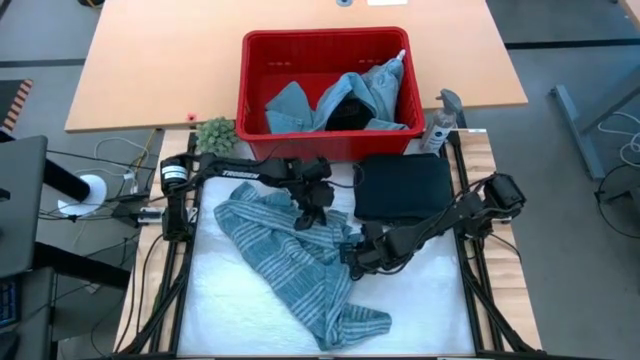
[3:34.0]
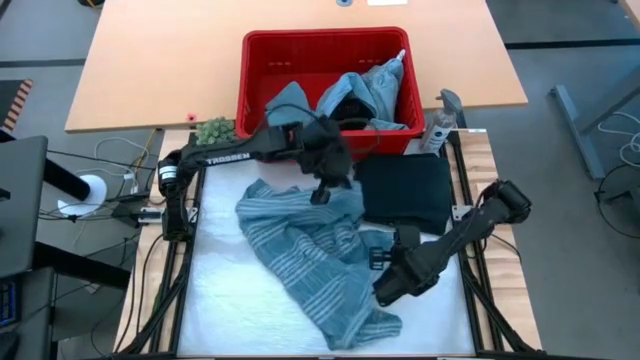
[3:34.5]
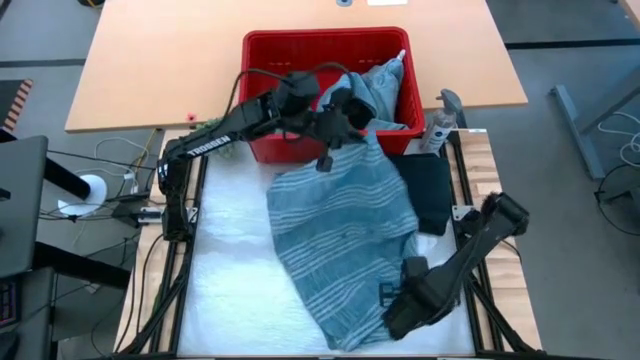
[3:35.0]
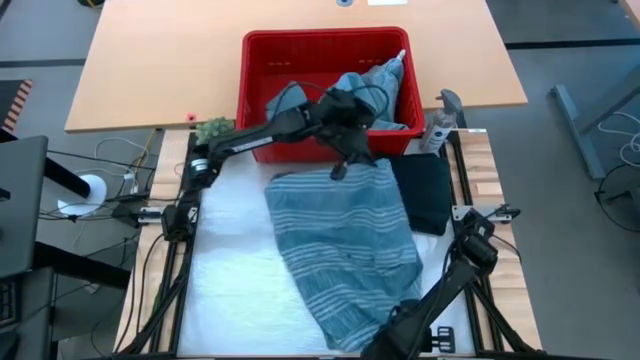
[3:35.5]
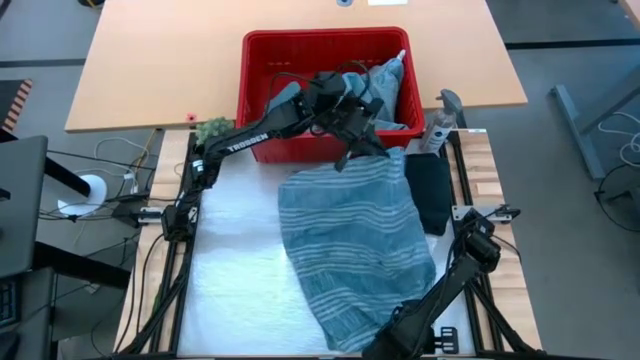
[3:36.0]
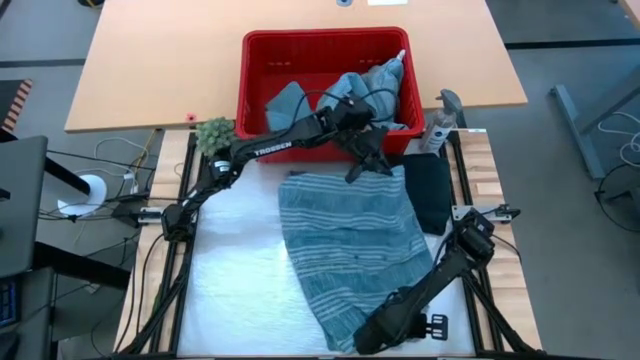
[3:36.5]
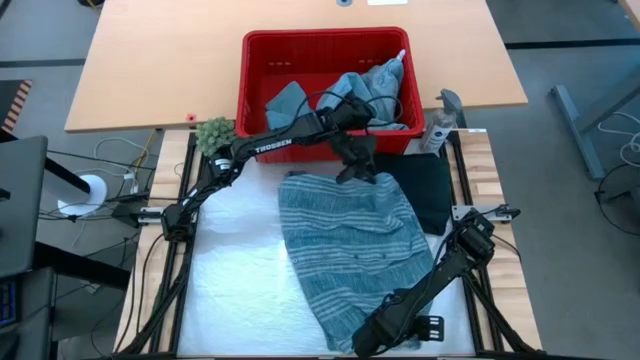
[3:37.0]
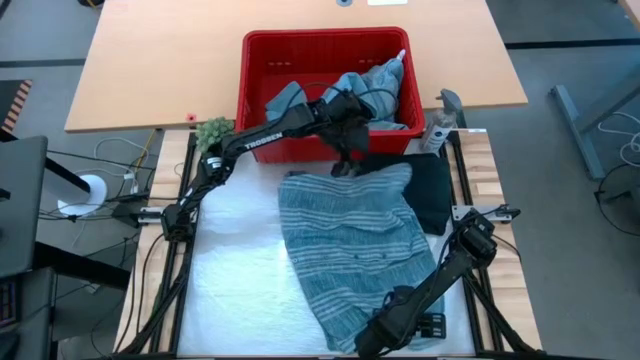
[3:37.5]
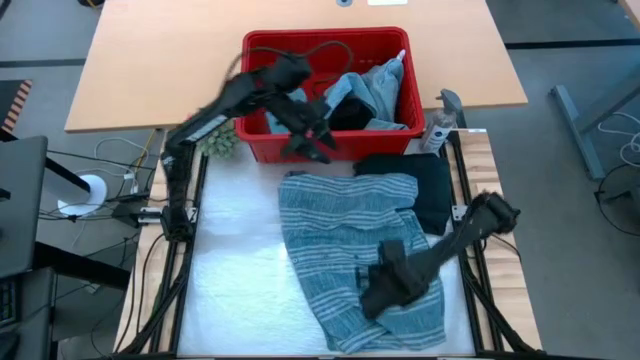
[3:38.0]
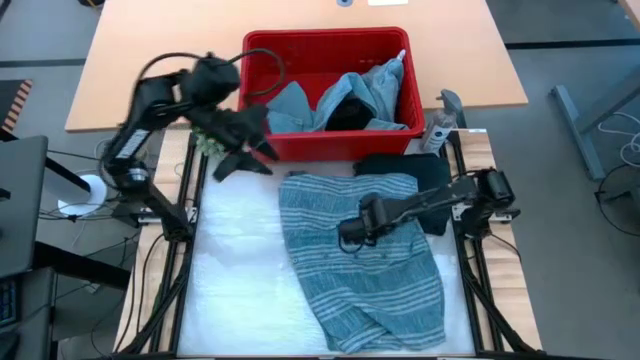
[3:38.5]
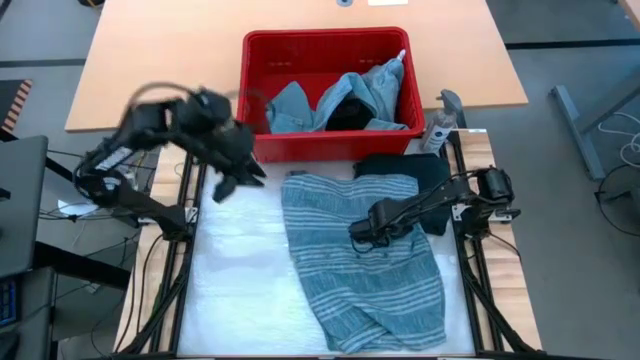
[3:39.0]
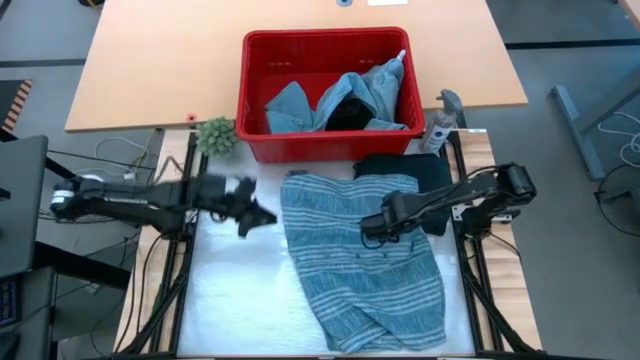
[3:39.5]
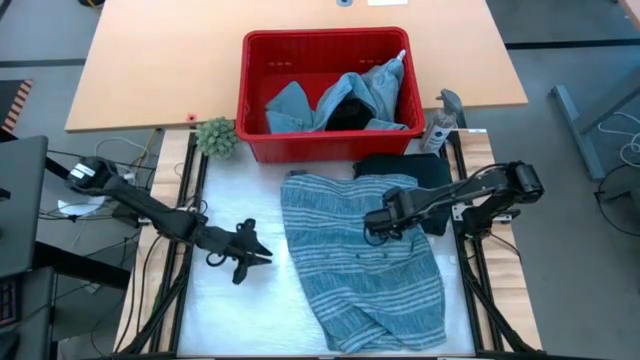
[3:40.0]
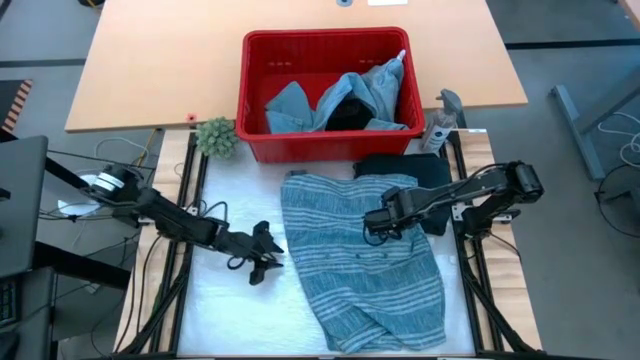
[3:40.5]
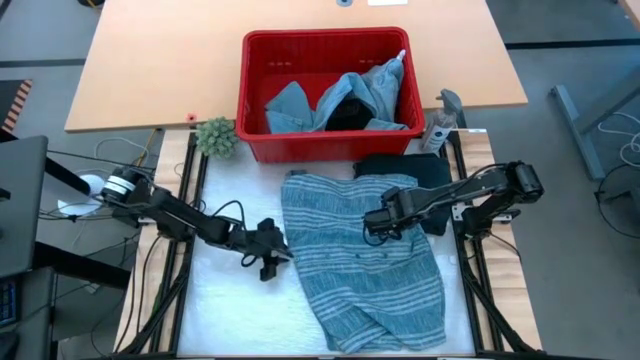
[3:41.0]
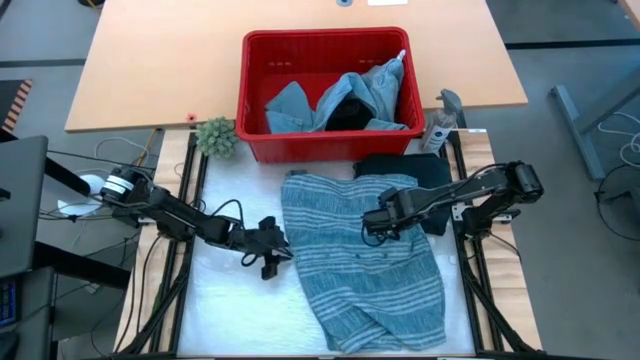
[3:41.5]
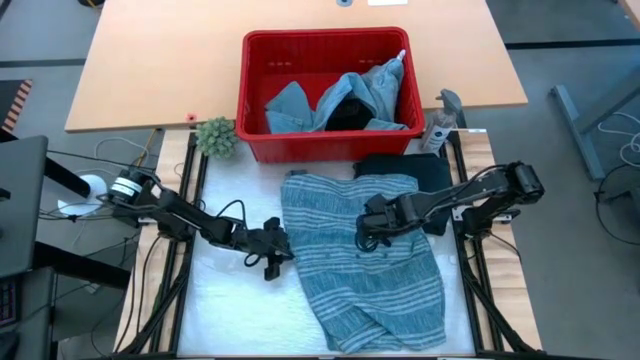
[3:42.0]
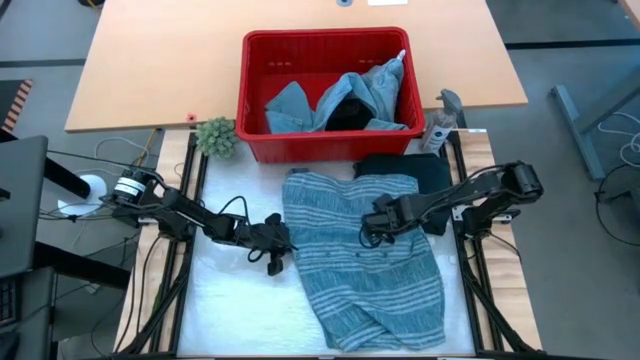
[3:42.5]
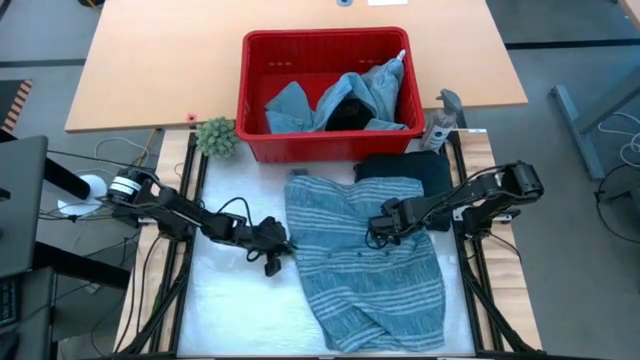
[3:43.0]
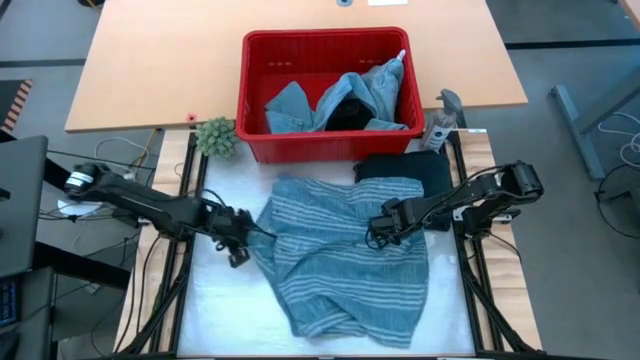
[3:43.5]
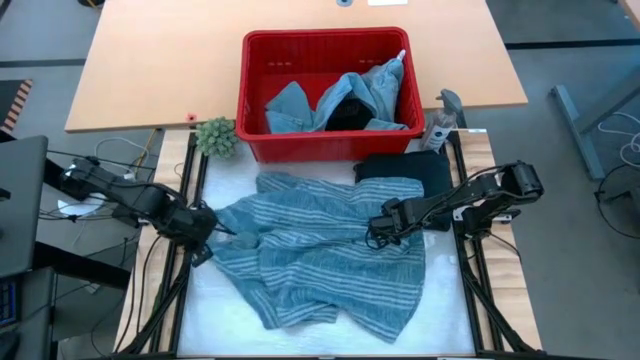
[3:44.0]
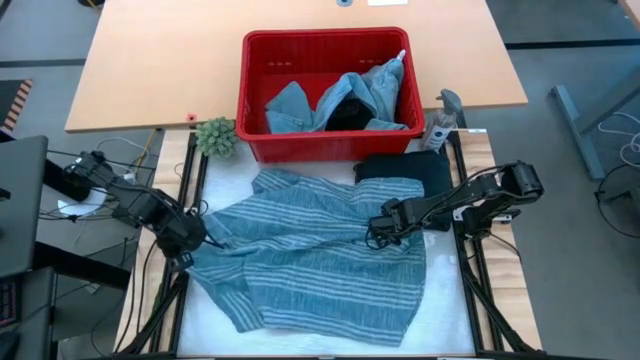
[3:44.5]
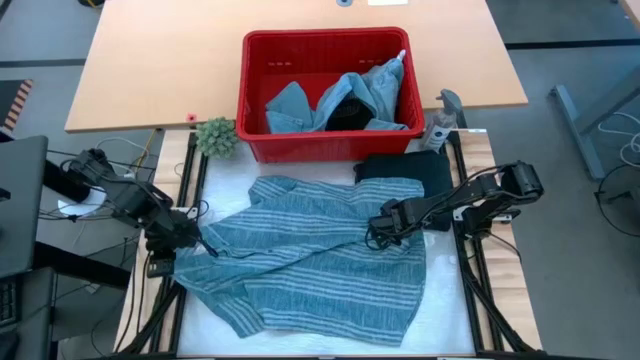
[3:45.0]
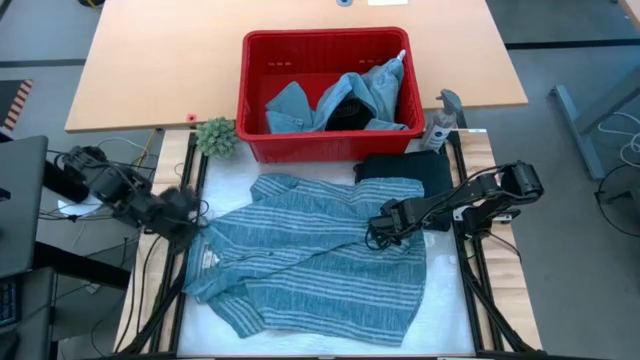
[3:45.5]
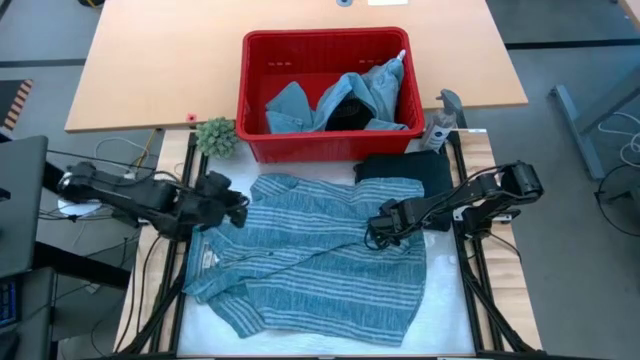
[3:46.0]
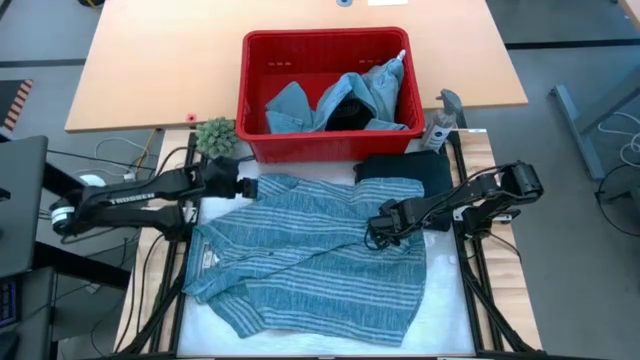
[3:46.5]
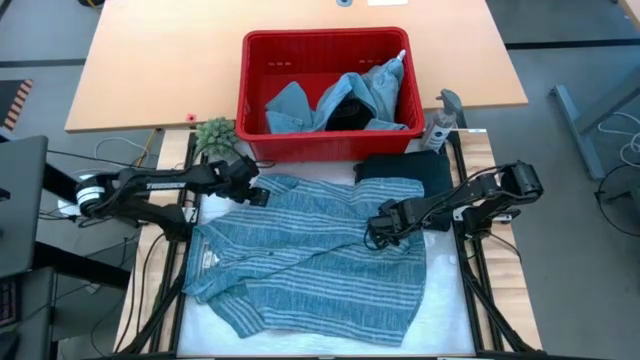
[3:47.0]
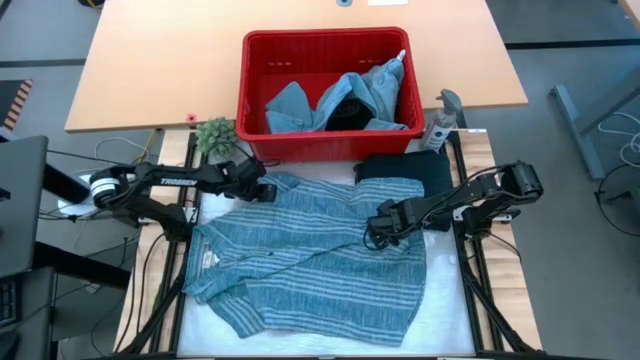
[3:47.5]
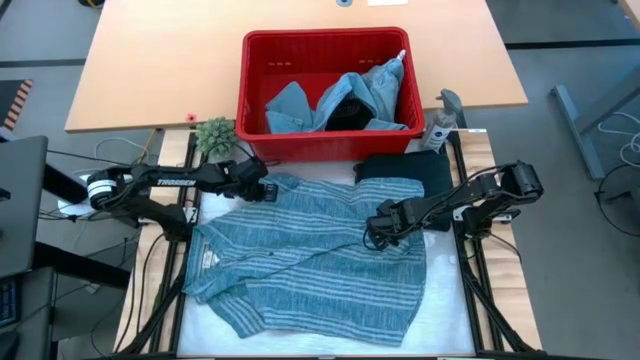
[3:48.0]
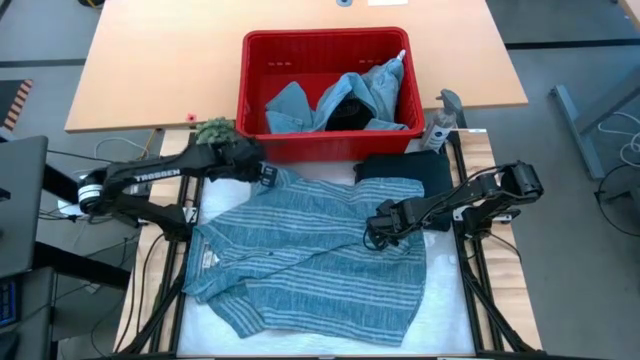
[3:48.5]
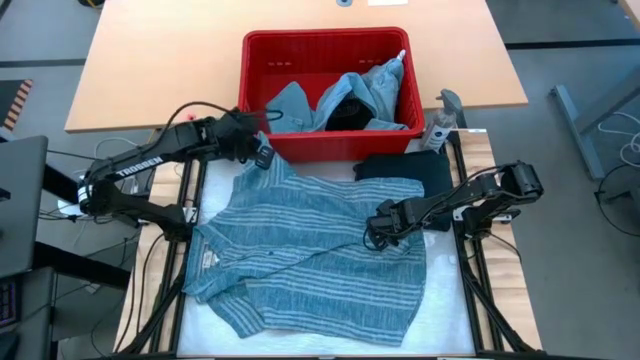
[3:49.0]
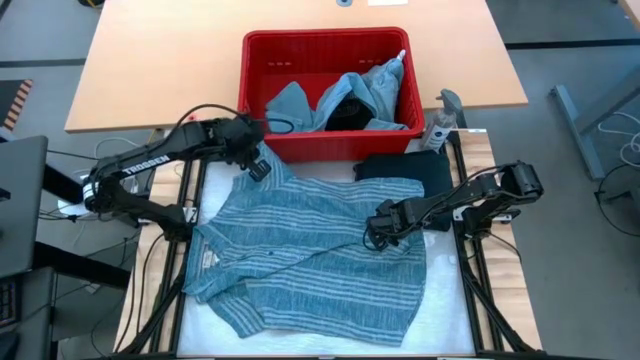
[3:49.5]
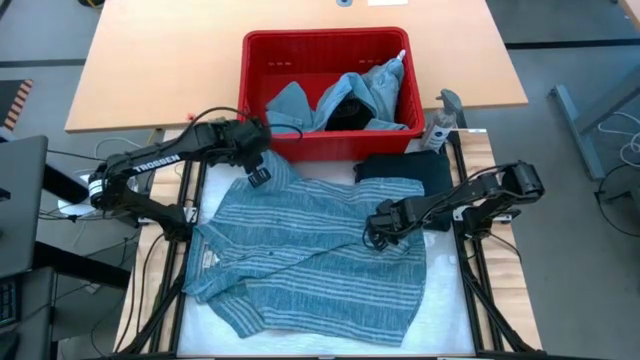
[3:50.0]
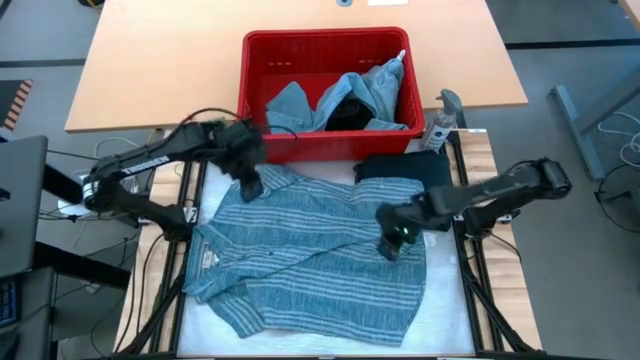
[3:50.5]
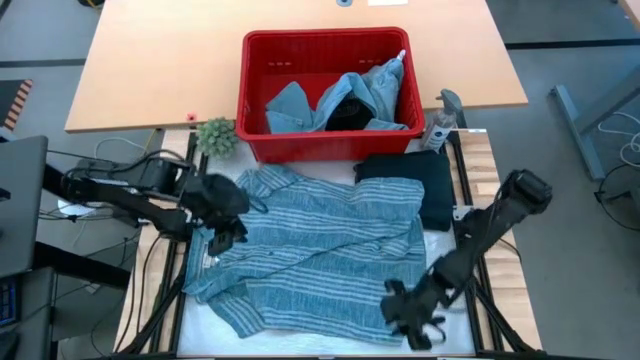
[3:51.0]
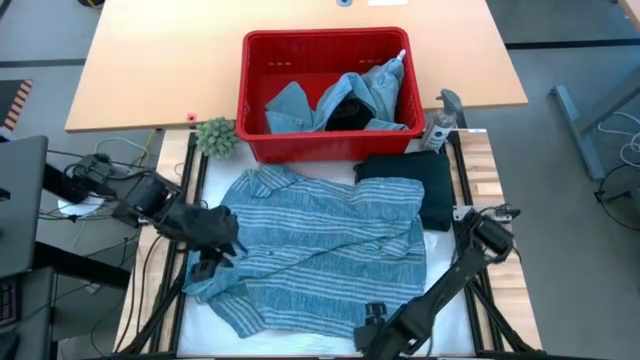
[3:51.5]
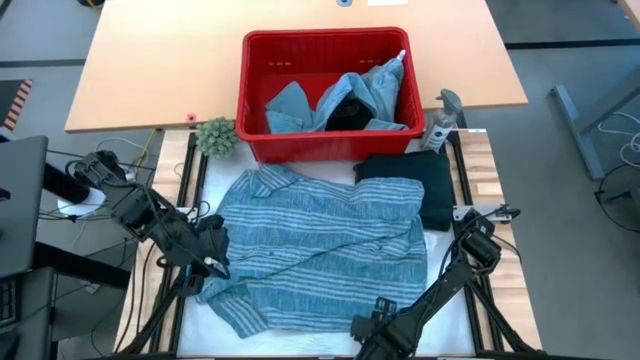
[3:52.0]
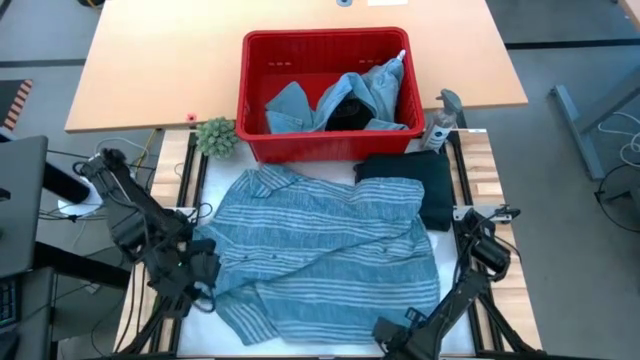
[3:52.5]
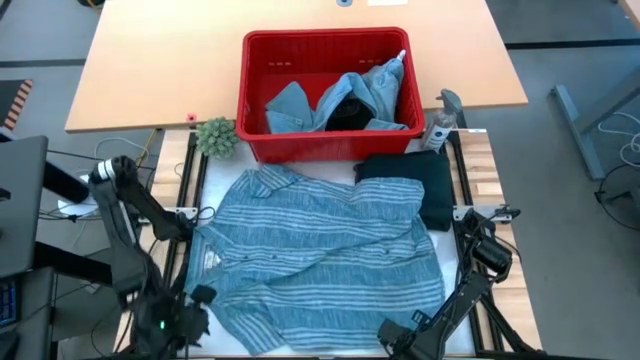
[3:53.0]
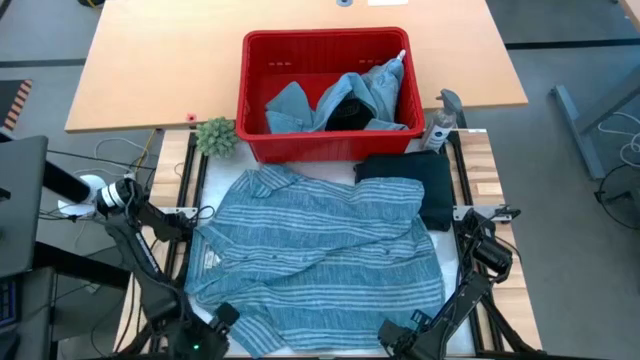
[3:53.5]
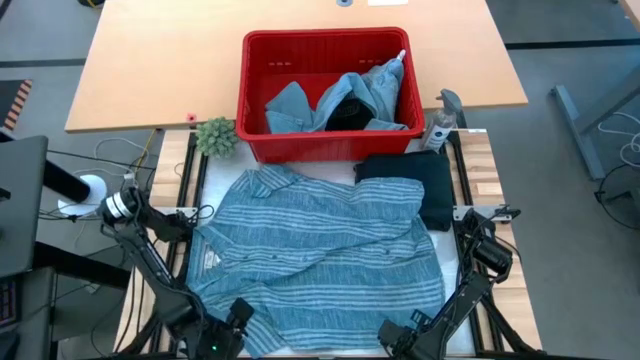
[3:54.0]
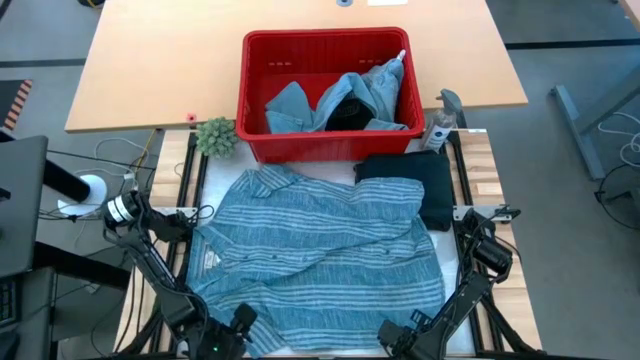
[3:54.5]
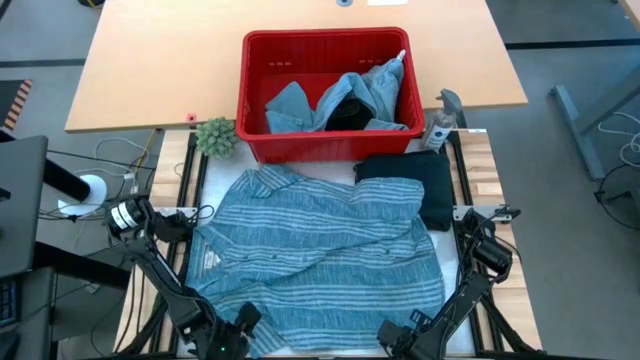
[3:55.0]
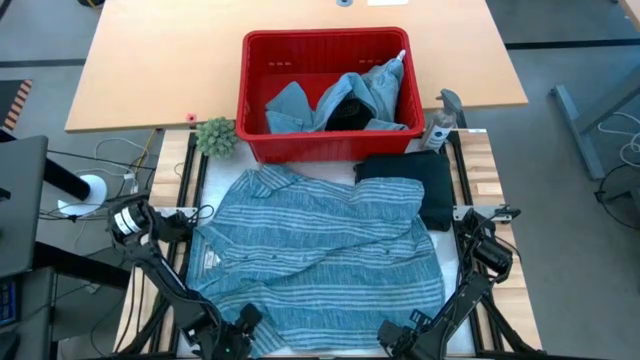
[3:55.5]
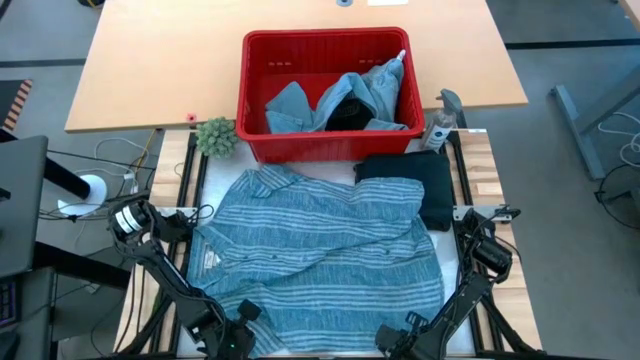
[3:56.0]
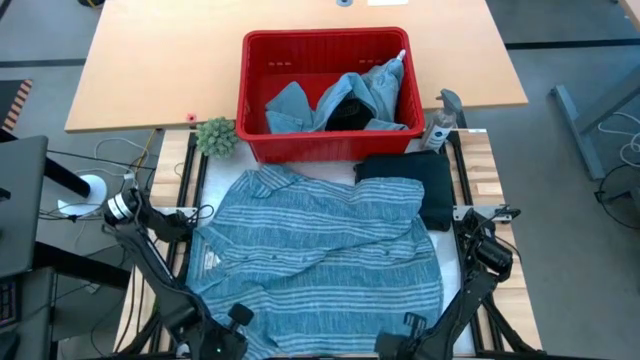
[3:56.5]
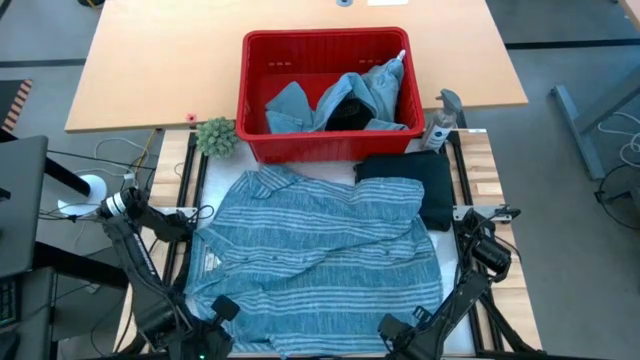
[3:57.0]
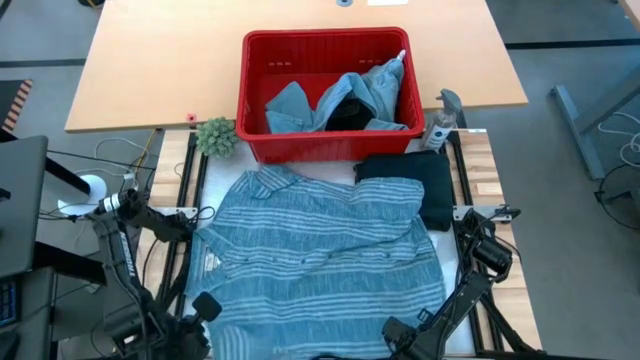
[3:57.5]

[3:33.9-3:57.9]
Task: Fold Laundry from Bin
Fold the blue polo shirt
